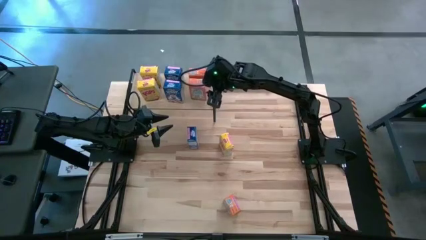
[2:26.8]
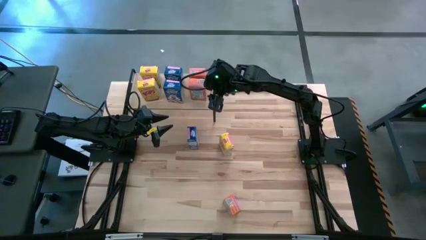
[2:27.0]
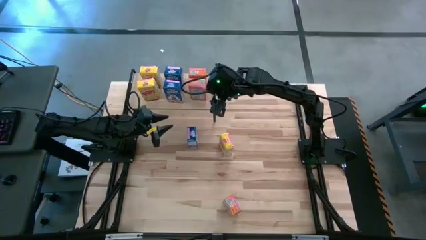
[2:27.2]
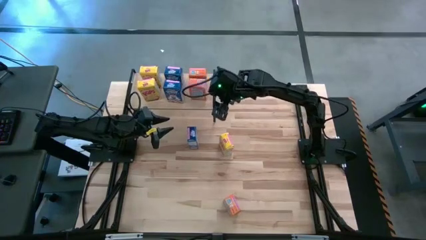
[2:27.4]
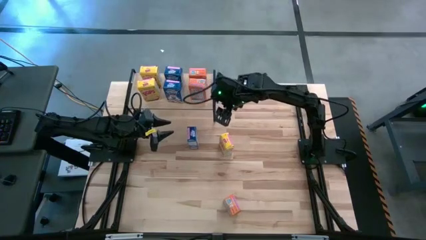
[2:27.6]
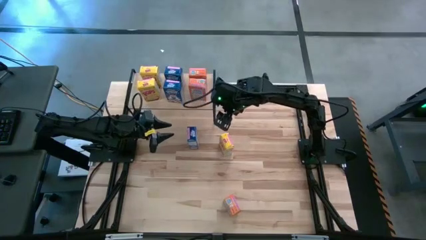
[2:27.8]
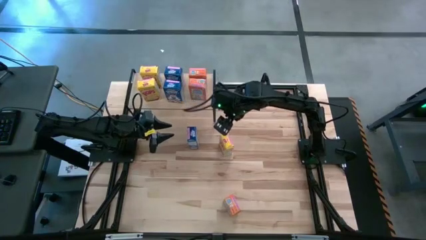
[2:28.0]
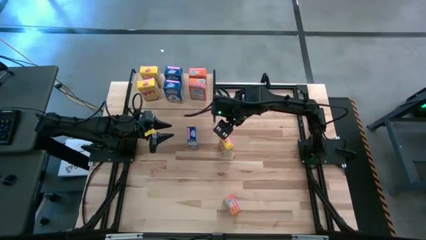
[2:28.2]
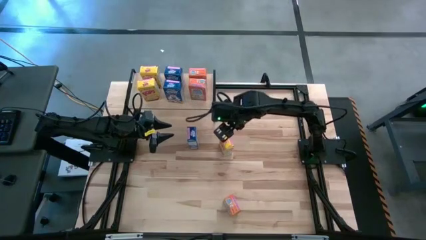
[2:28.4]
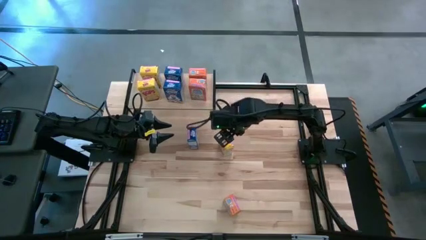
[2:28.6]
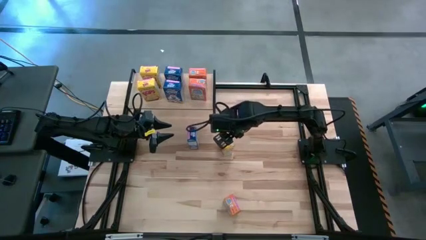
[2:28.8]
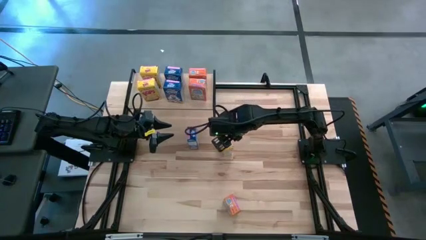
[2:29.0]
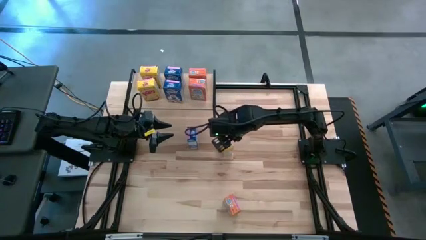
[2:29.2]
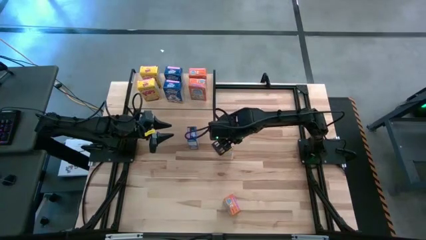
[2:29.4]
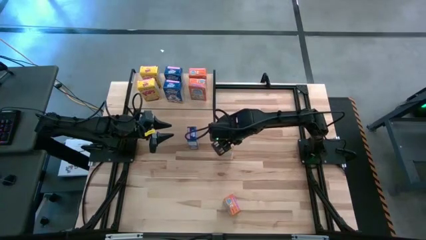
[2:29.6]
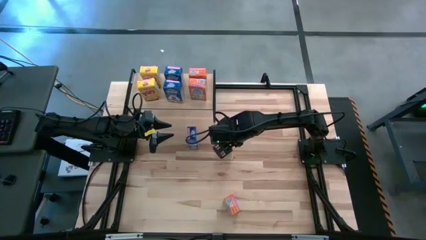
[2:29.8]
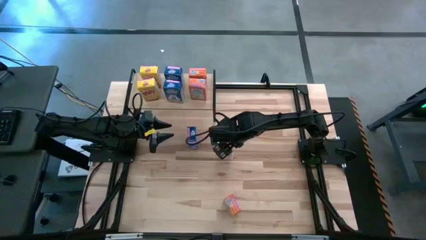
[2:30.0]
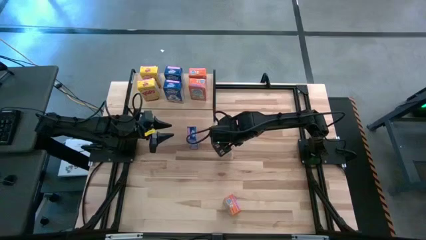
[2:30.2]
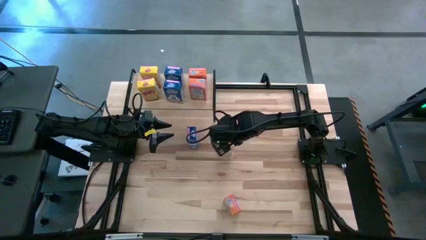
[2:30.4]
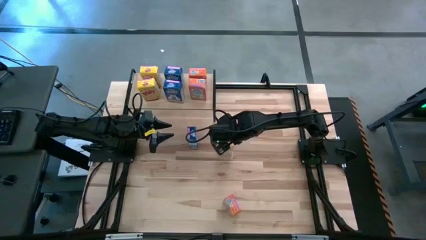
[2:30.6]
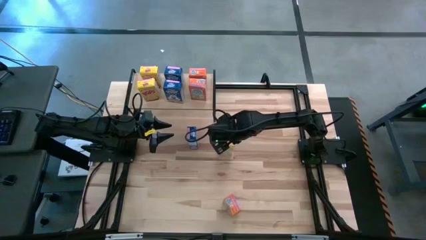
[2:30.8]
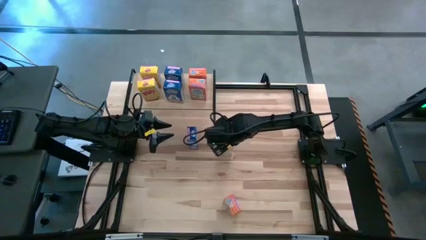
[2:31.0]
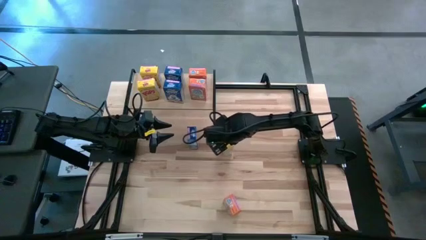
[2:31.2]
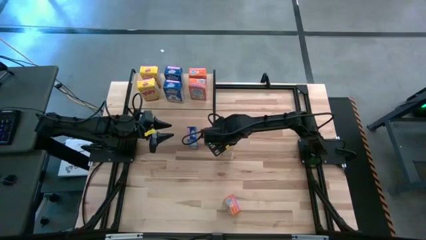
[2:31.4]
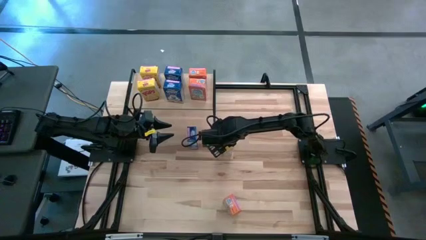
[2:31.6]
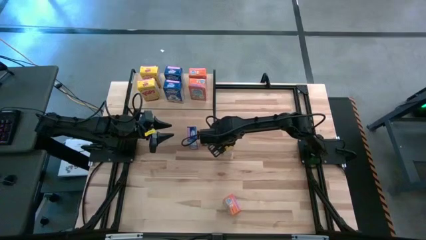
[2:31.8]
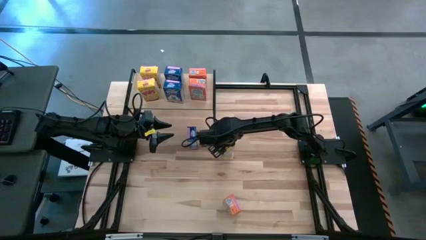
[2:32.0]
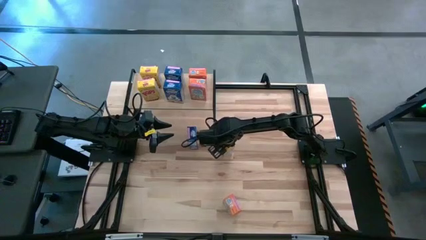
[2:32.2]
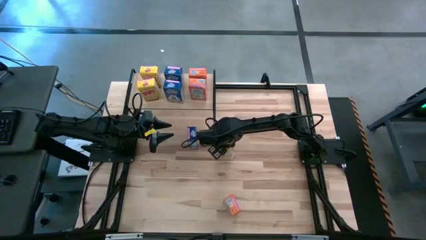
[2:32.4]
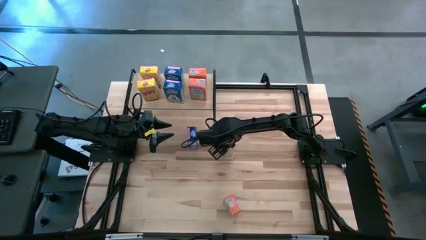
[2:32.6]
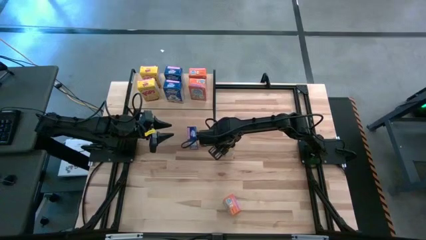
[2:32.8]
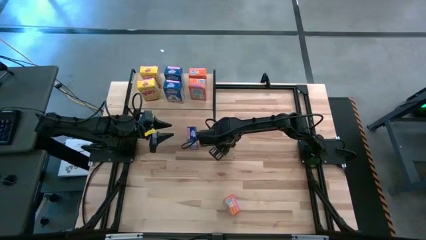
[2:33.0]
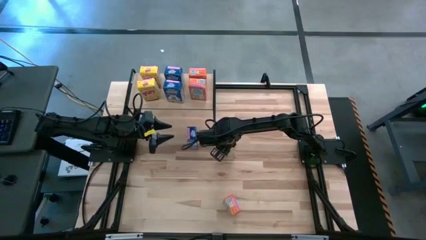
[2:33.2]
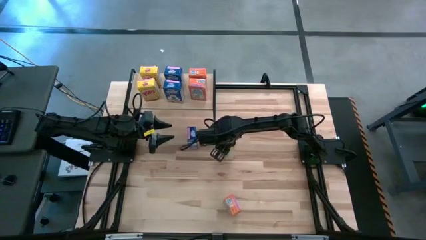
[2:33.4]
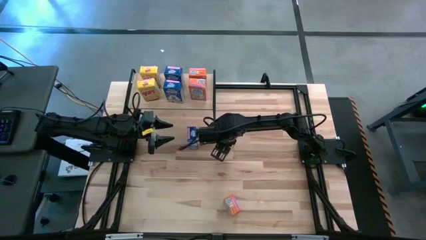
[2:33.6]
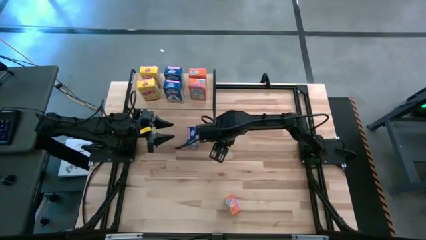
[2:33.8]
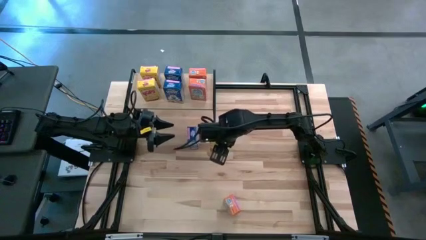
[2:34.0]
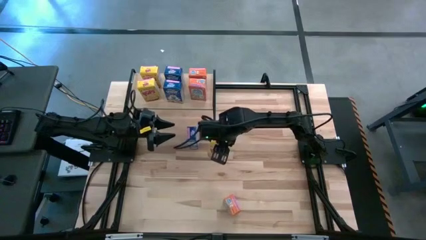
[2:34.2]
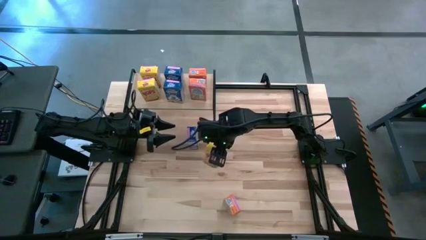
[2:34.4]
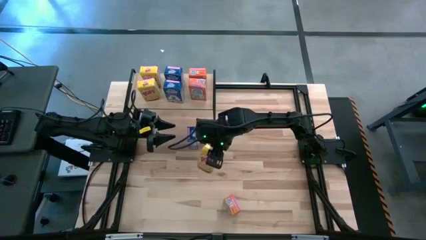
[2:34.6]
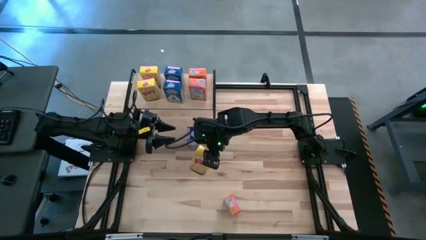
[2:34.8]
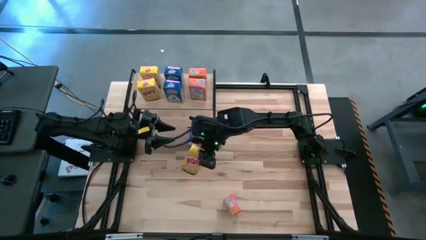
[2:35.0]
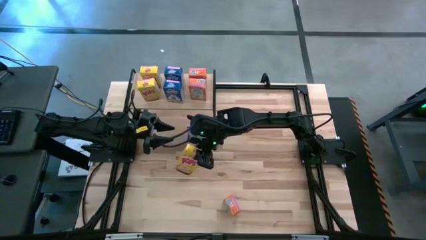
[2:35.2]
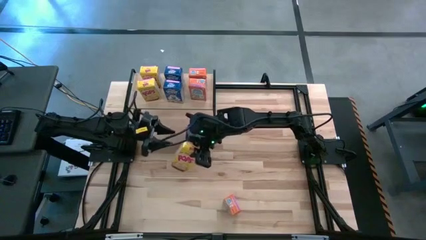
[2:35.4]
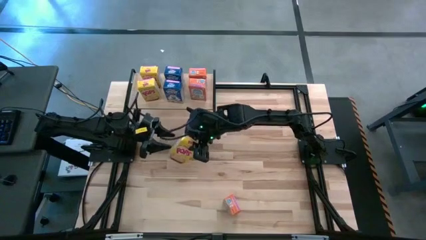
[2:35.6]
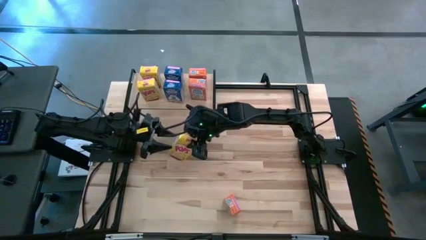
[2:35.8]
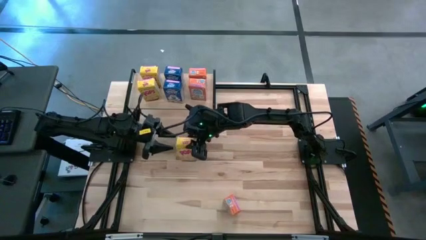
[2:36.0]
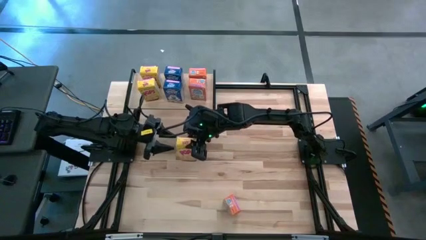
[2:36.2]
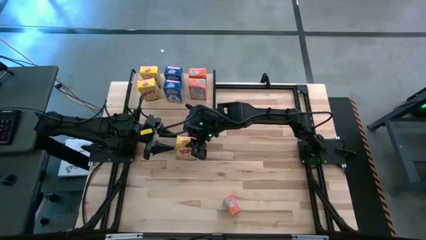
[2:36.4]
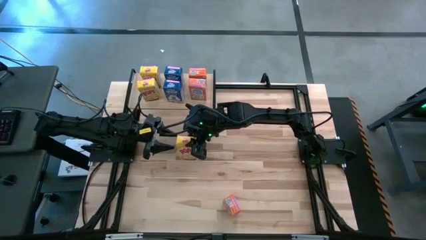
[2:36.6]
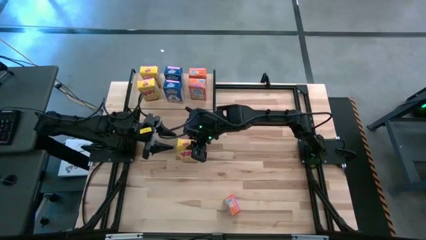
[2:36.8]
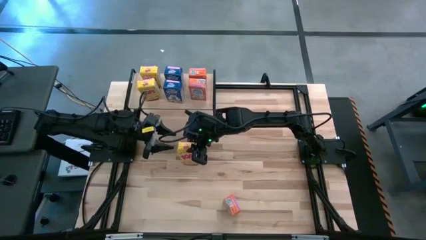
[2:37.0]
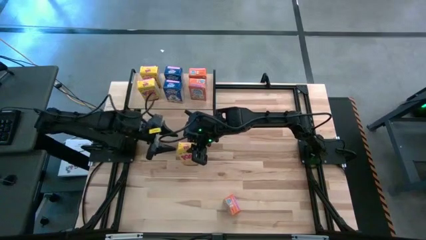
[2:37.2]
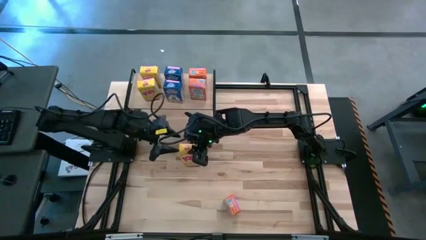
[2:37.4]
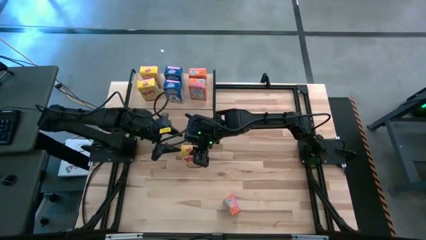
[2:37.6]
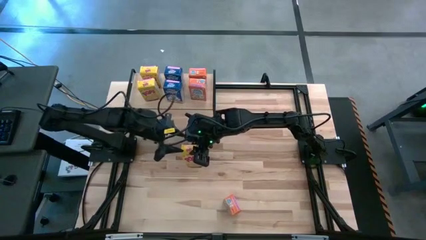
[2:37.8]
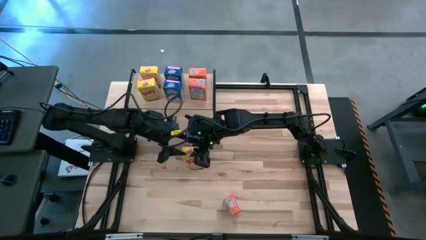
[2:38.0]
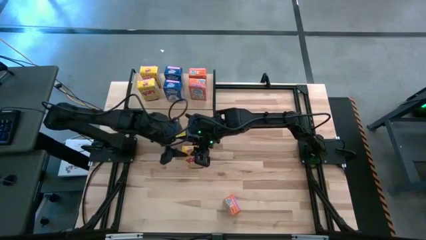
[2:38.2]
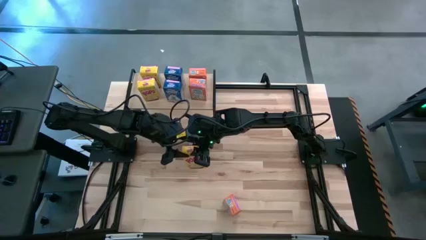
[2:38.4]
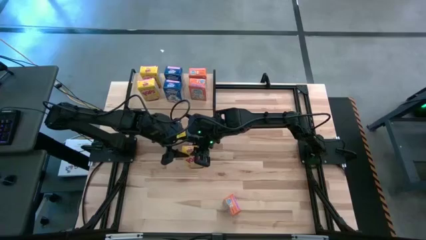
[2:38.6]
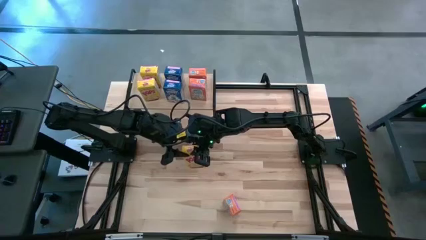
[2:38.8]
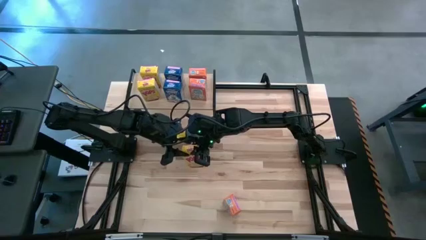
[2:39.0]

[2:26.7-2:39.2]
Task: Stack cereal on shelf
Put the yellow cereal box on the shelf aligned with the other yellow cereal boxes

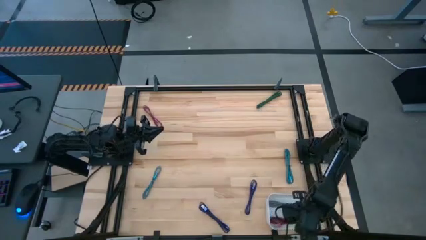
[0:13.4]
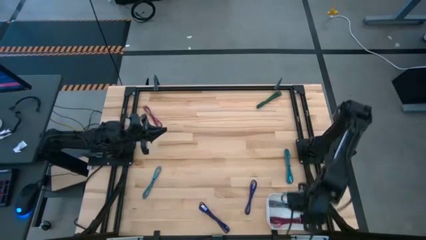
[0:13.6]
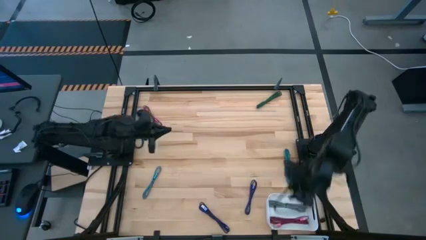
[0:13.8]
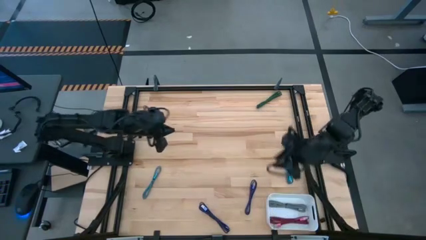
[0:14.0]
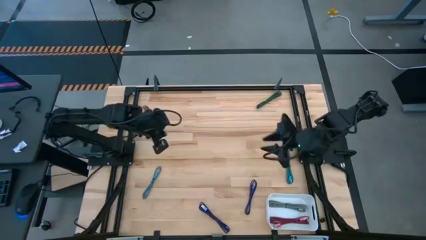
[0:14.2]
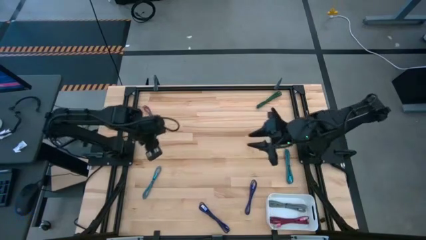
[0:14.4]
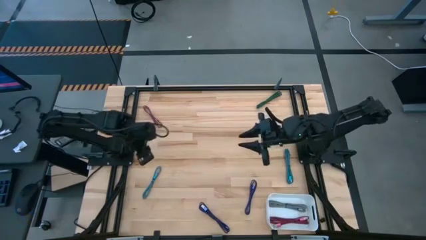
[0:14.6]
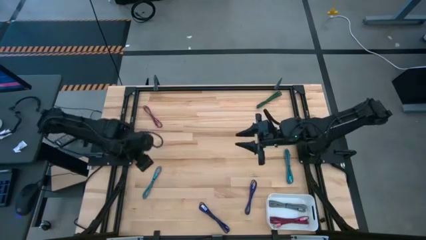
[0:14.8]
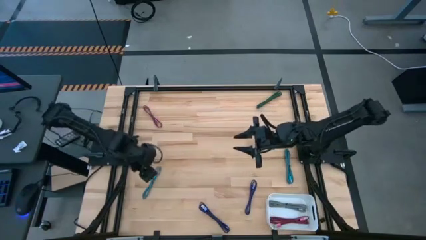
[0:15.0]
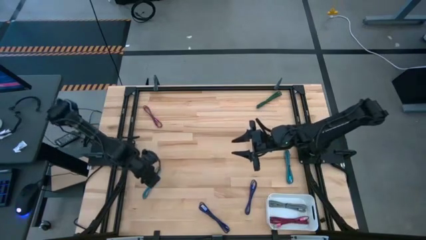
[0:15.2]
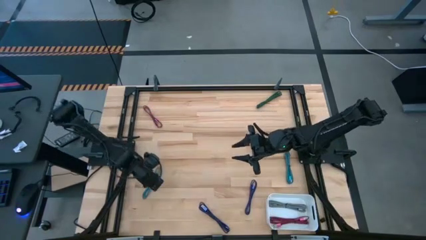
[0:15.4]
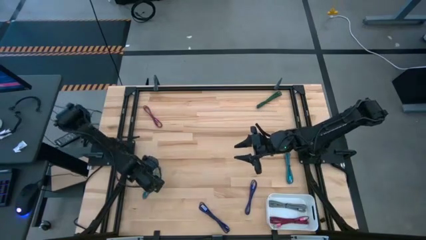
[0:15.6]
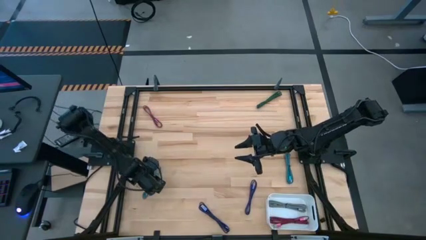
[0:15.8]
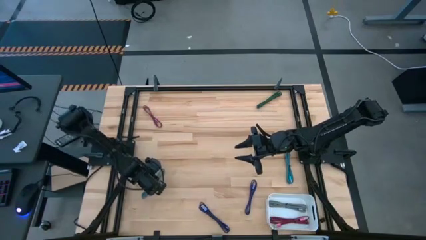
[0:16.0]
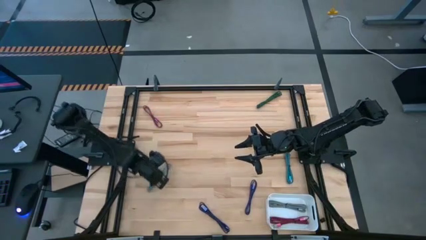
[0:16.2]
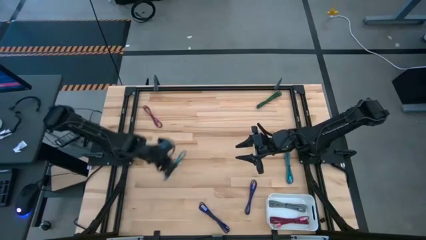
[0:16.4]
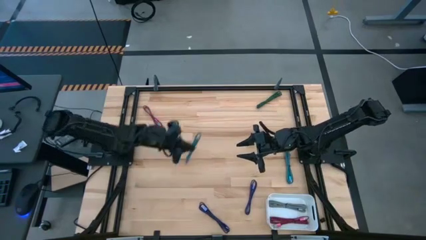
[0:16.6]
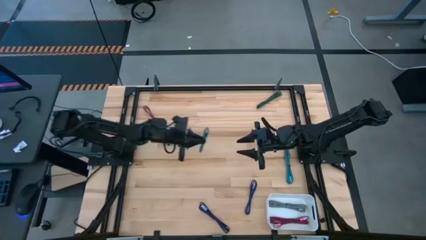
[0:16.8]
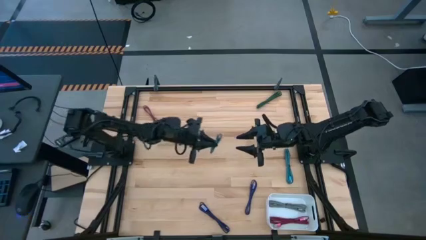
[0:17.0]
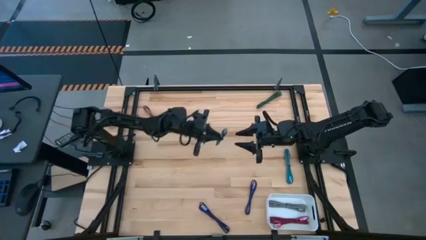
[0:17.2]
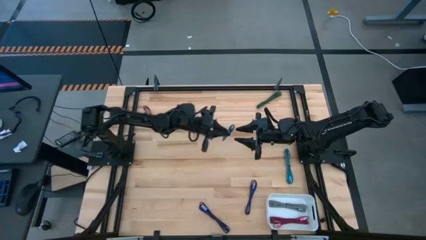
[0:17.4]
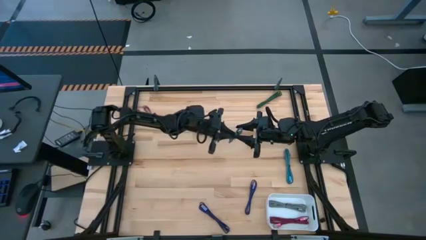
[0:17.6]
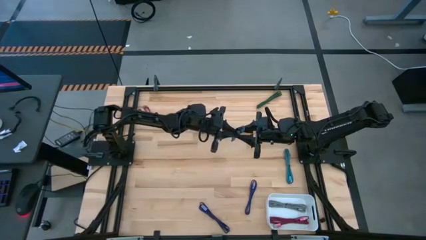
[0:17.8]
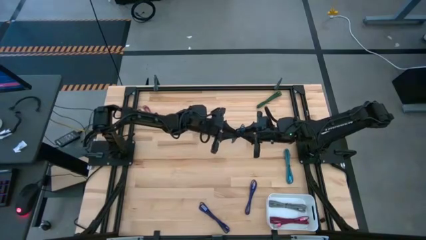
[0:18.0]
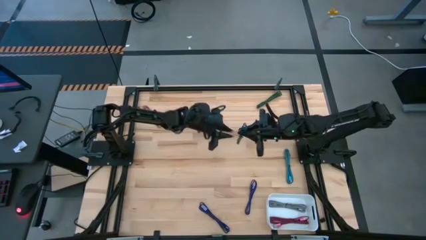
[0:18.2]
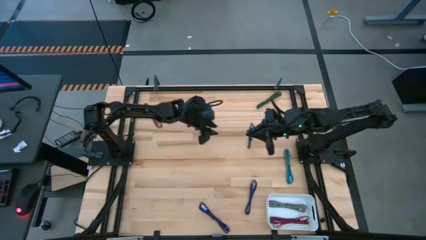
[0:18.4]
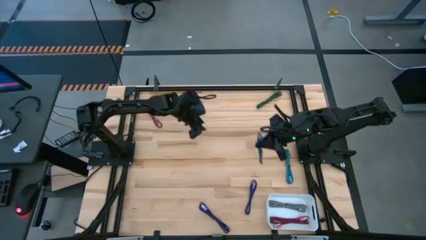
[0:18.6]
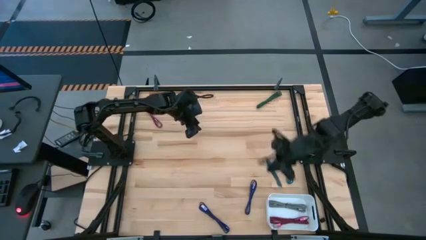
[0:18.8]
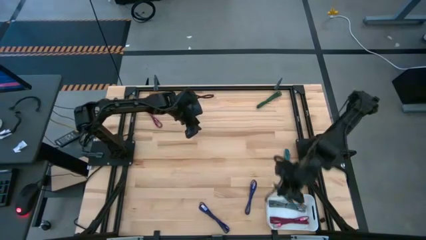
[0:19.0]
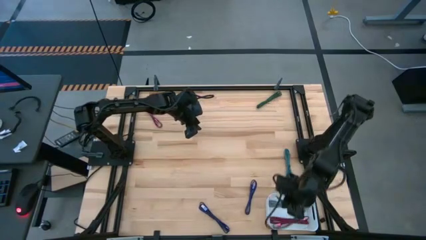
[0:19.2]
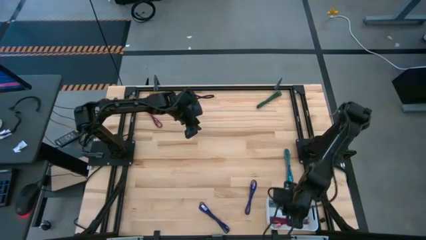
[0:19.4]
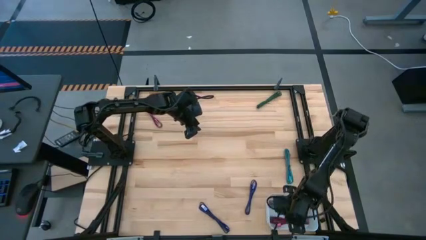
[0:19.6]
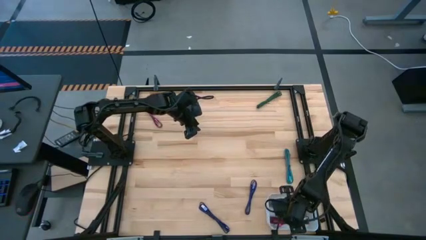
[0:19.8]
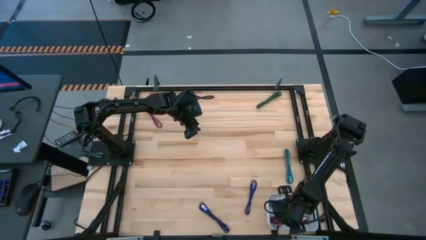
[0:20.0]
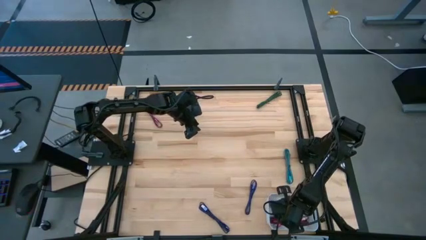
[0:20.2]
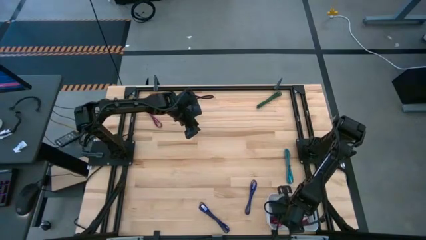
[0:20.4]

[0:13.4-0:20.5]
Task: Pick and place USB-C Cables
Put the left blue USB cable into the white bin
